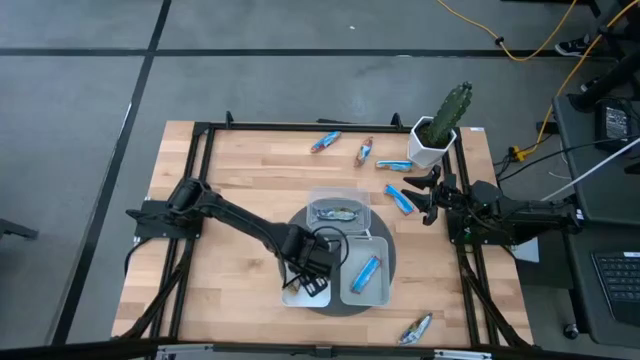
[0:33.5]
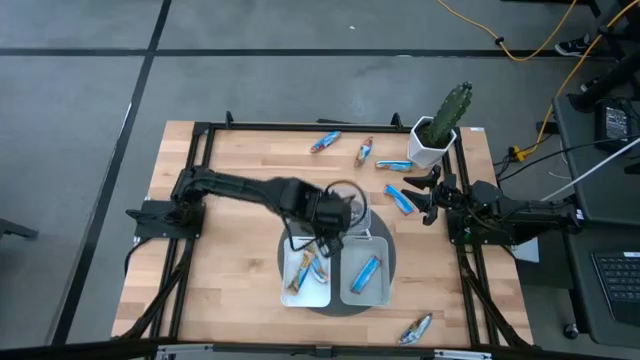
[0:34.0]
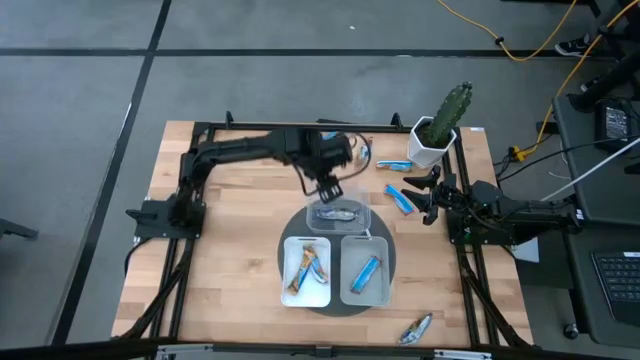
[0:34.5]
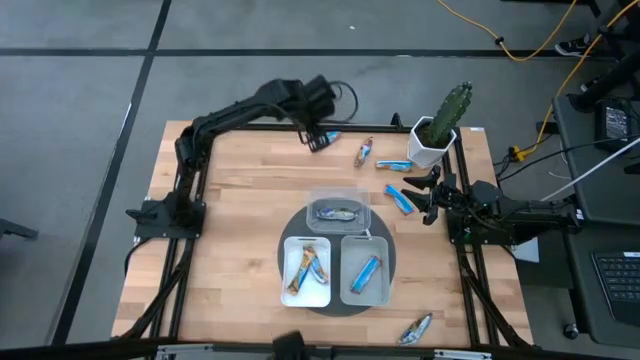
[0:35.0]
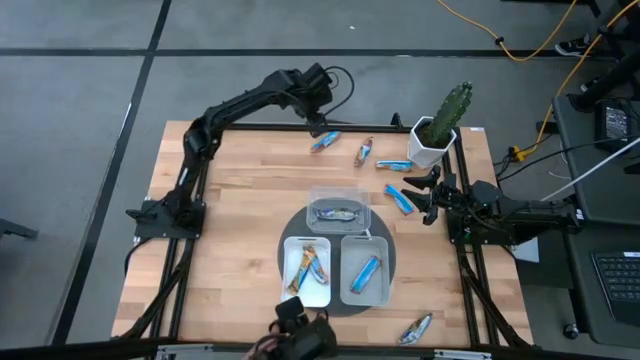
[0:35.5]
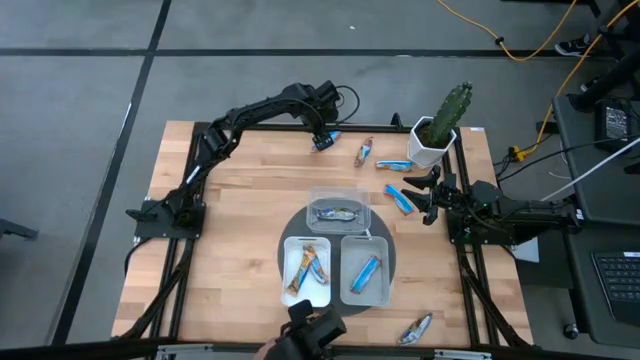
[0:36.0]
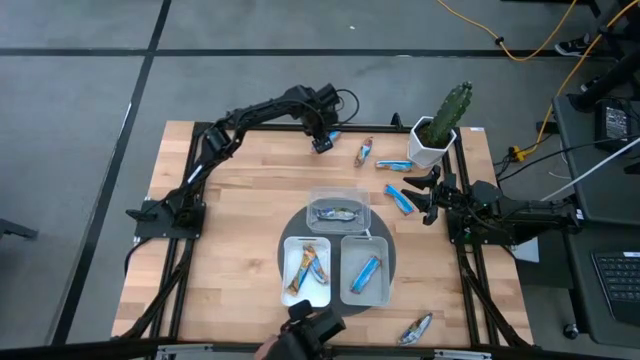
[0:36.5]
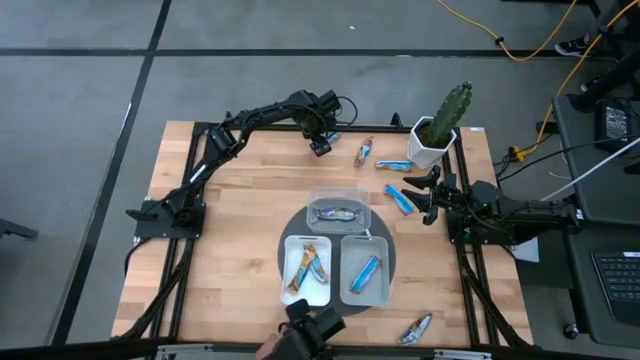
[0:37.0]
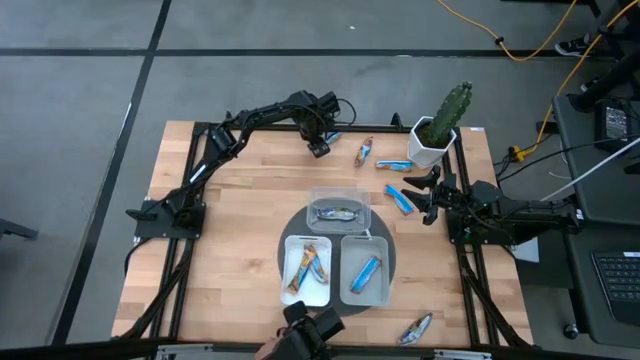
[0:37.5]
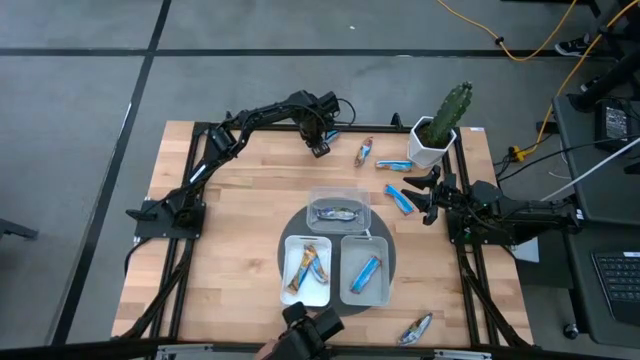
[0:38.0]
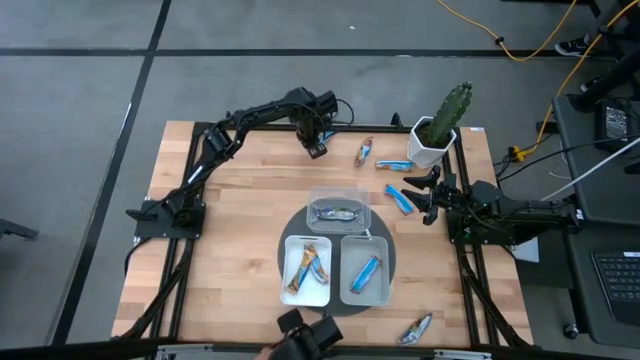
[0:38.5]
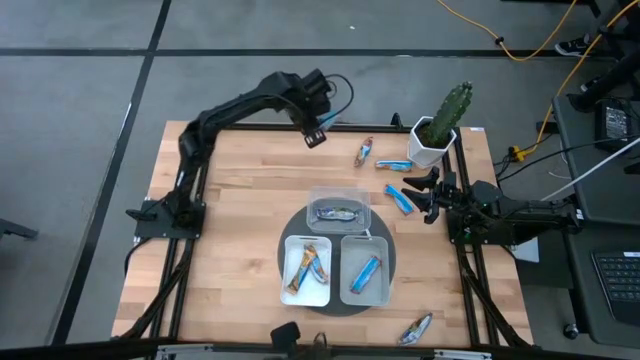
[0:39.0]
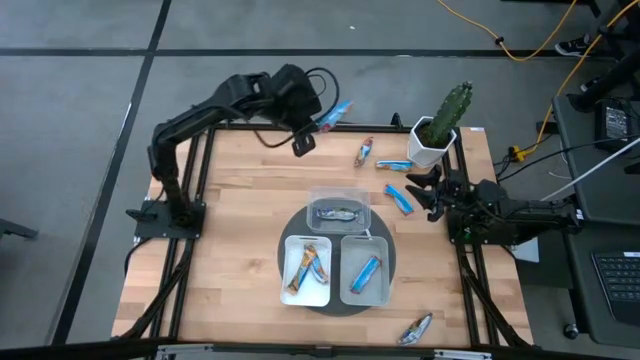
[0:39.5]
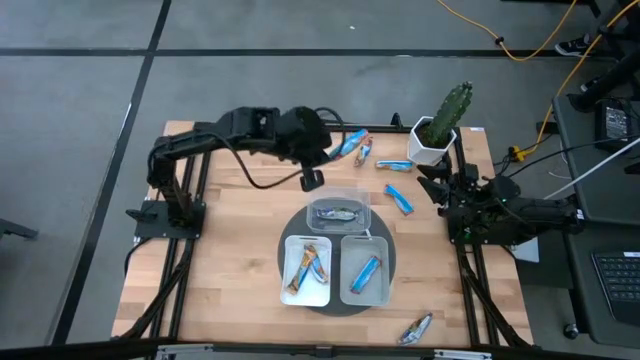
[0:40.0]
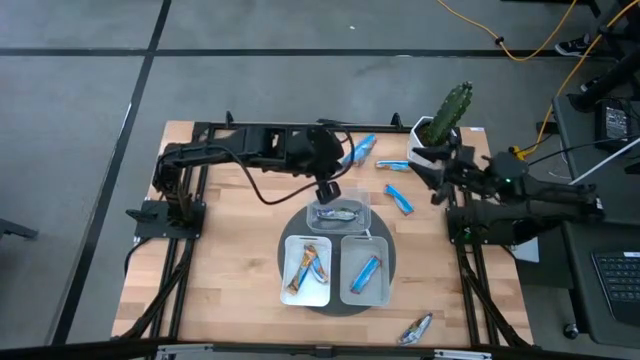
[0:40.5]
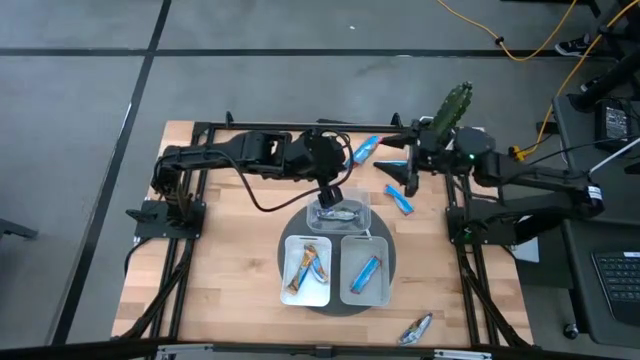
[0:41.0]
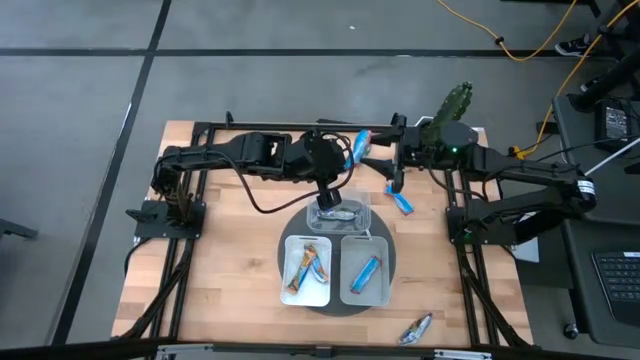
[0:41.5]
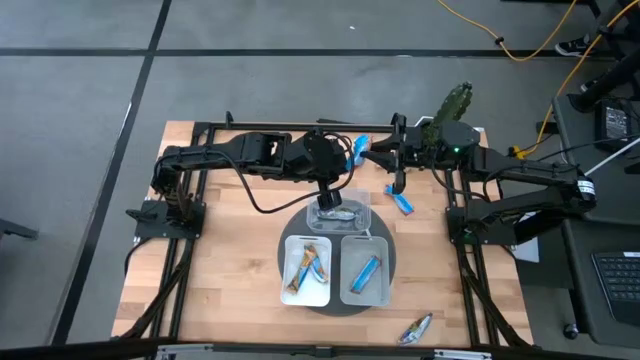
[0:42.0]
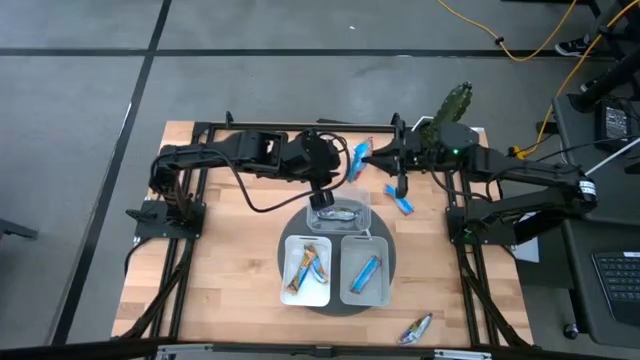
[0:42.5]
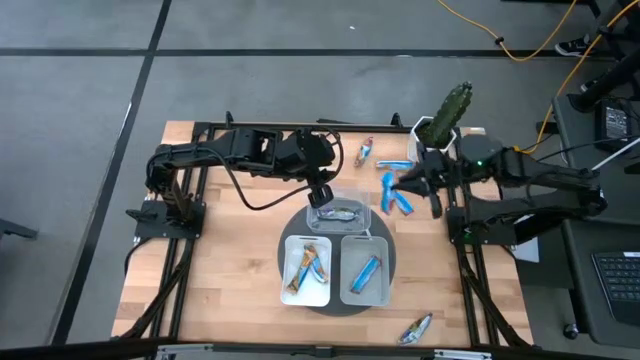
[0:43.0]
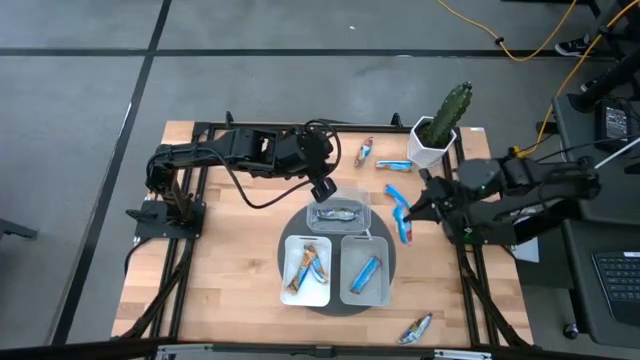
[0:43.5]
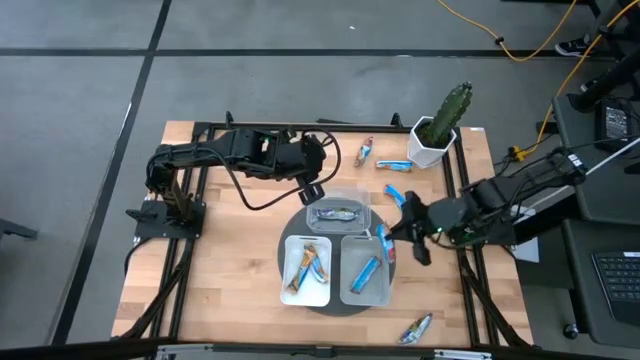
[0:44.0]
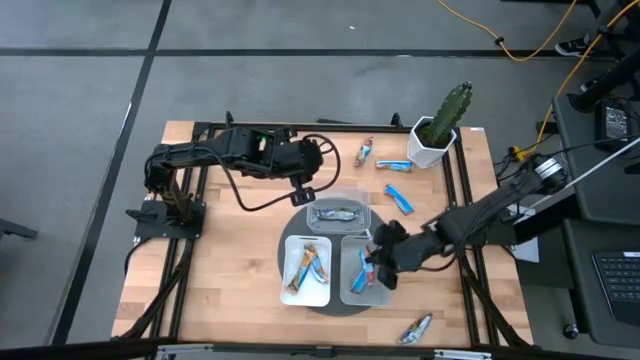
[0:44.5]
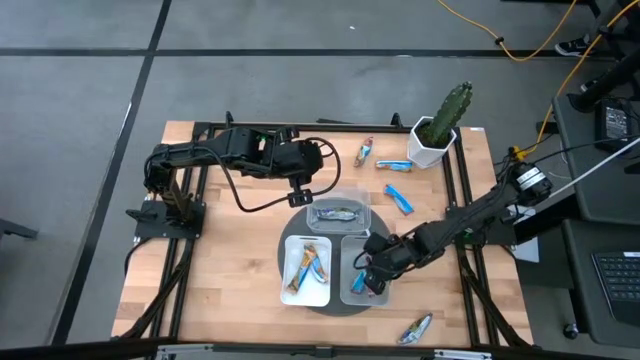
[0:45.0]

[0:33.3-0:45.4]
Task: Pick and place Granola Bars by type
Put the red chocolate chip into the gray bin

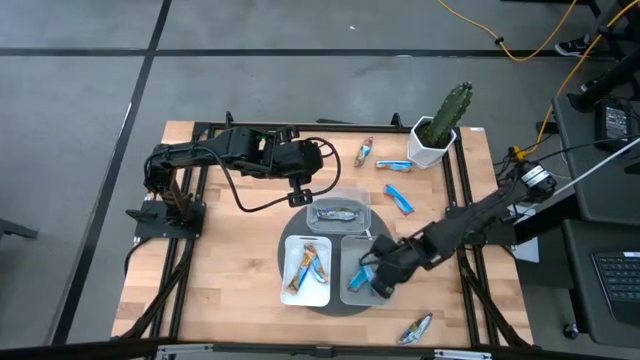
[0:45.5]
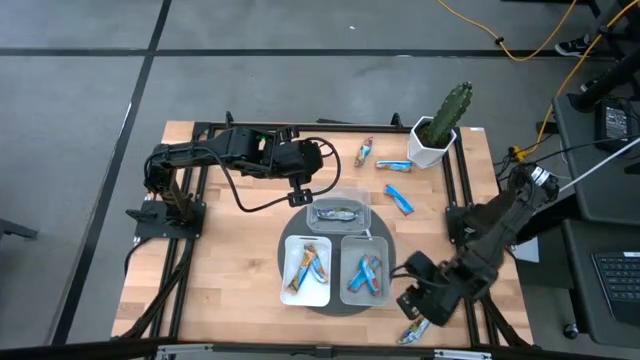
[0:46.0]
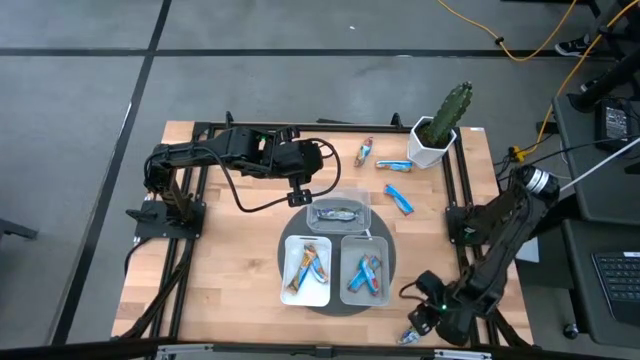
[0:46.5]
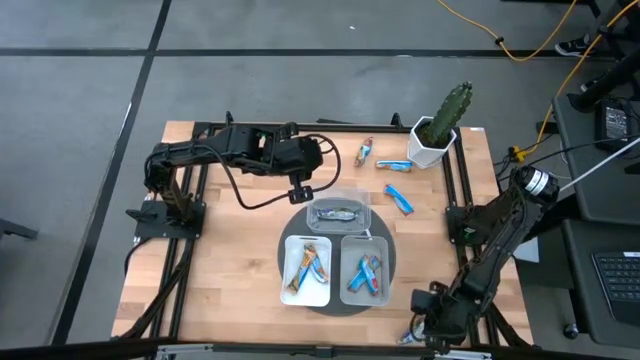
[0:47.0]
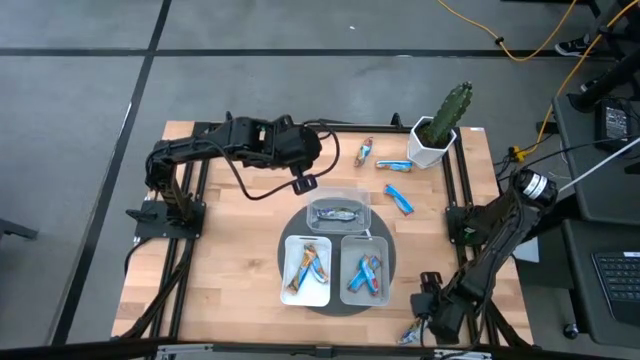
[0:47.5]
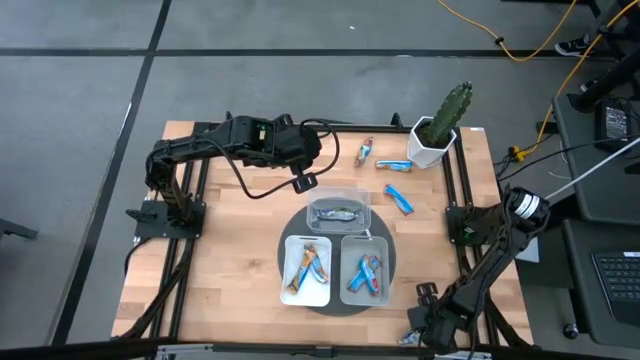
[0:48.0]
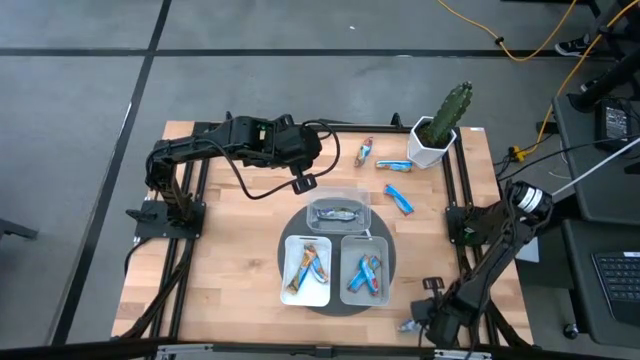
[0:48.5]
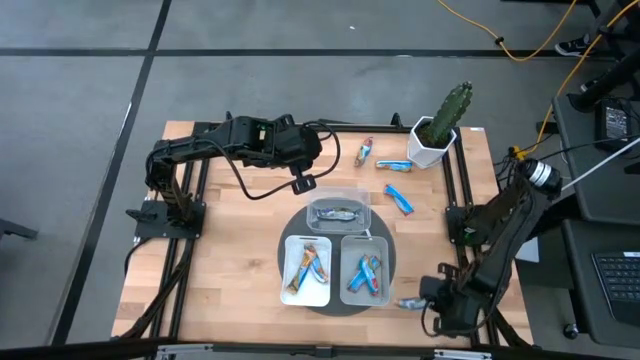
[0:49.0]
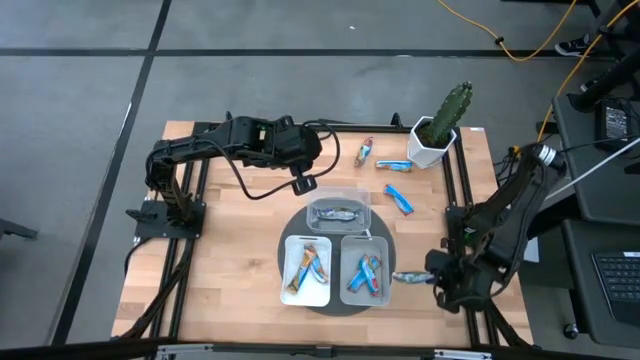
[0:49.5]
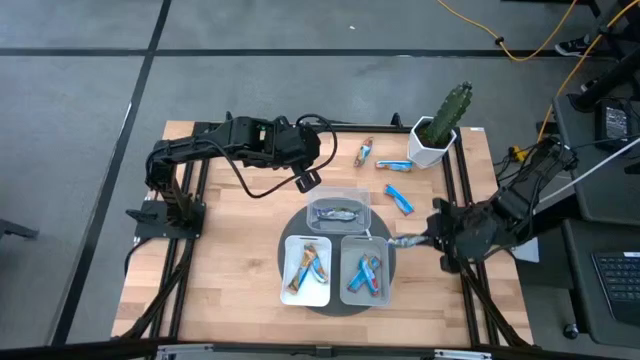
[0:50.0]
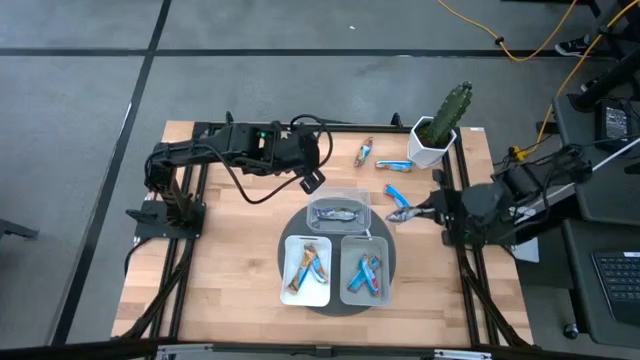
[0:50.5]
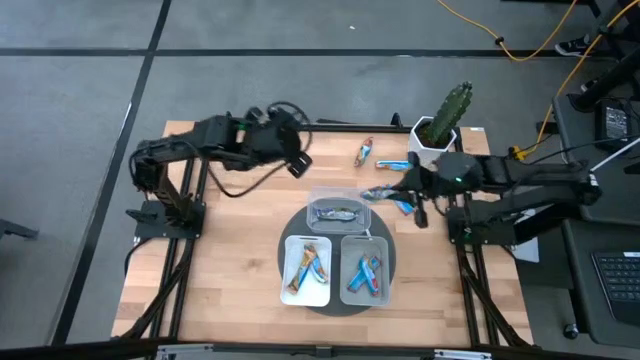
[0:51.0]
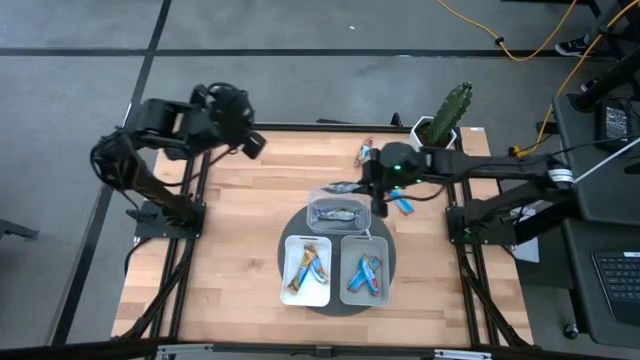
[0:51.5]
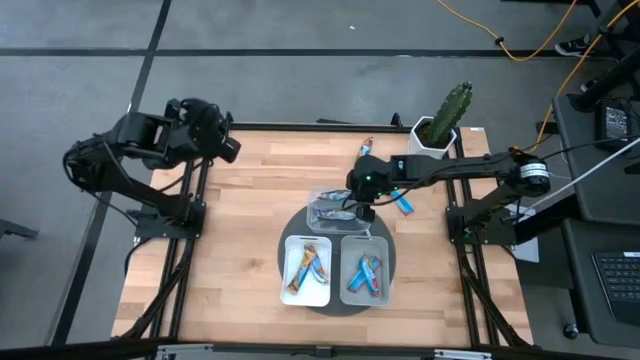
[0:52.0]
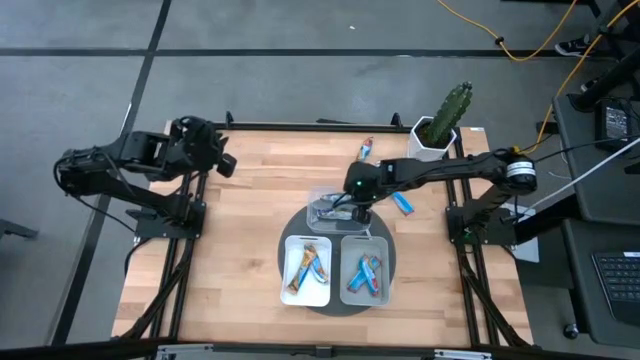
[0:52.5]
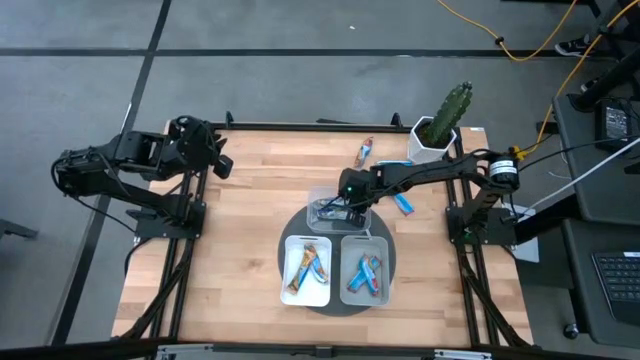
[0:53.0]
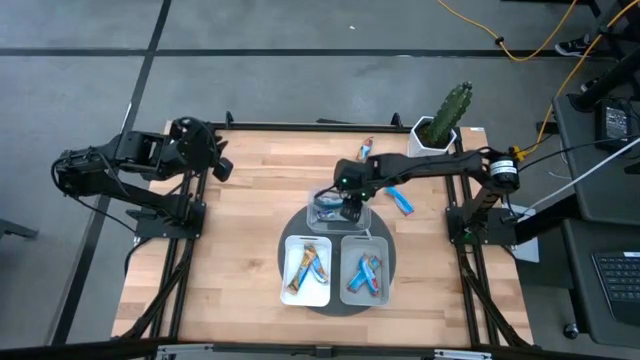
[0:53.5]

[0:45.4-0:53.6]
Put the blue chocolate chip into the transparent bin

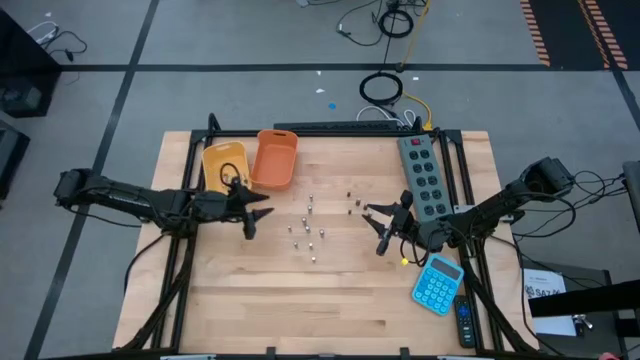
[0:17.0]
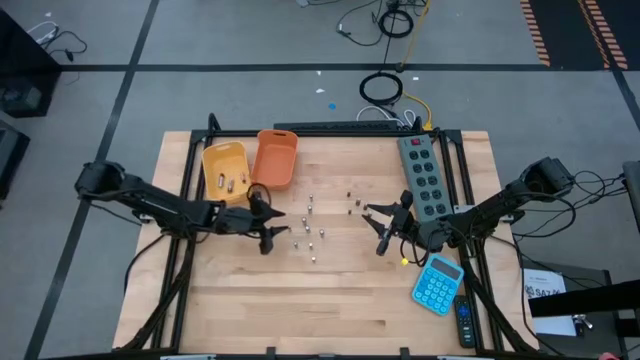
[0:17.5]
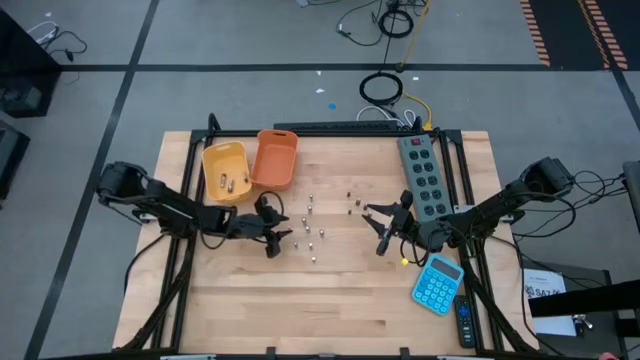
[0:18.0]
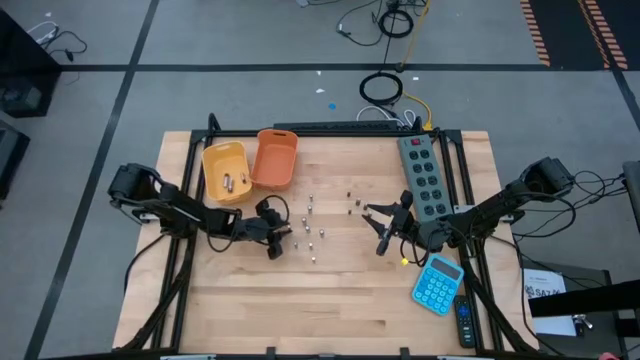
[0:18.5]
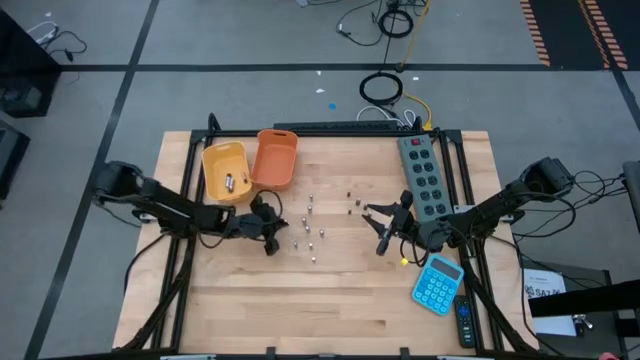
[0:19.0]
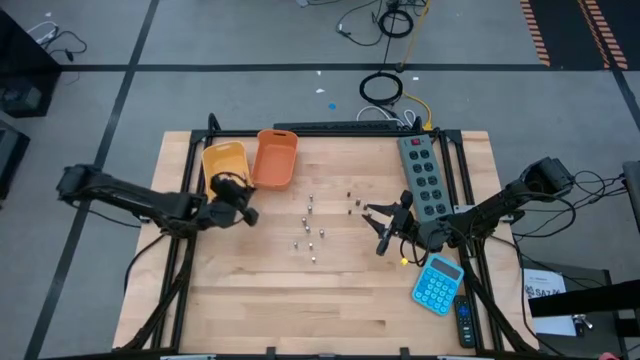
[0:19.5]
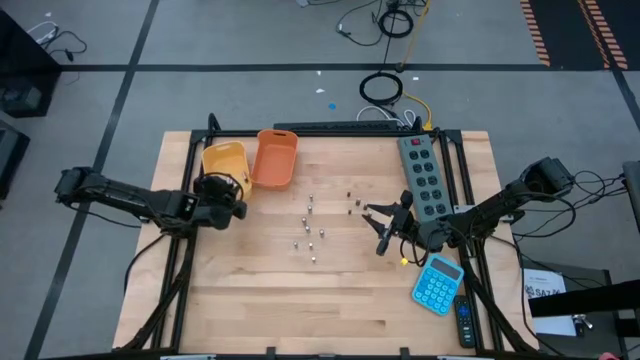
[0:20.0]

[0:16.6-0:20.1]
Task: Sort batteries
Put the silver battery into the yellow bin
